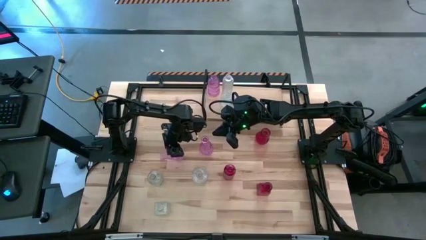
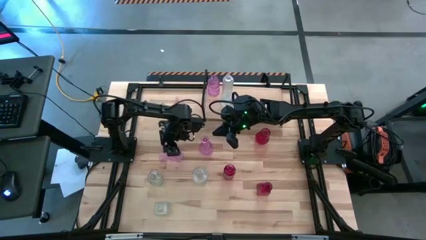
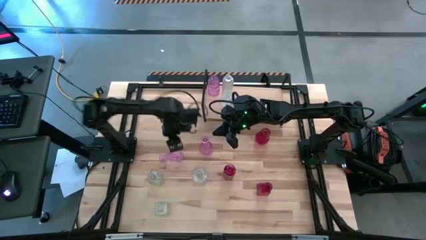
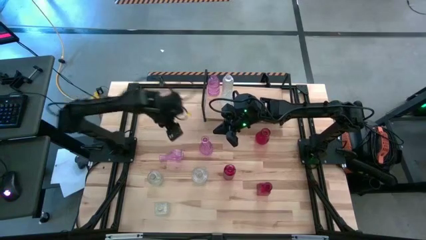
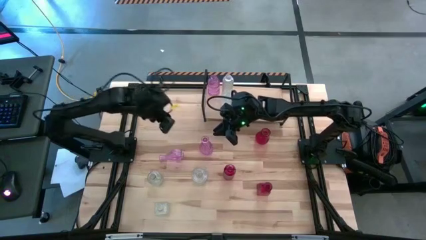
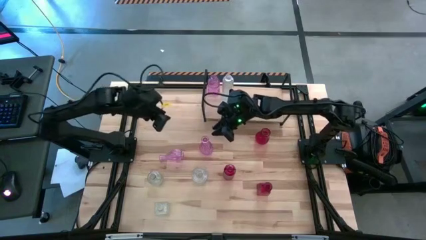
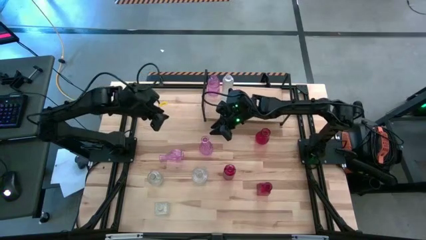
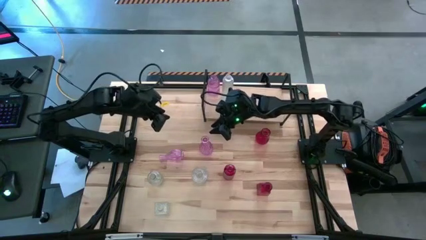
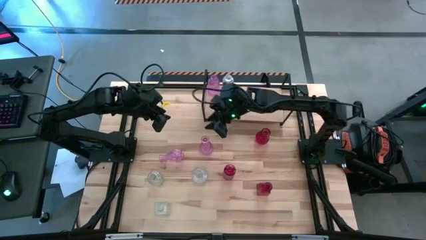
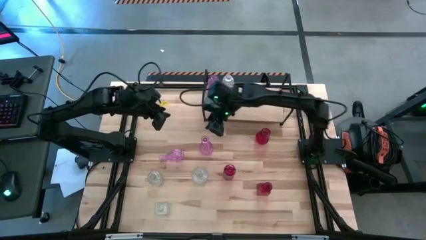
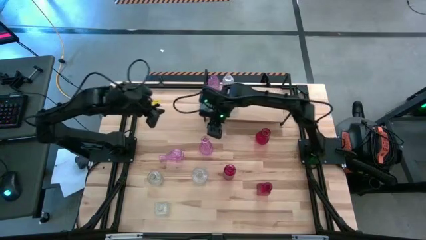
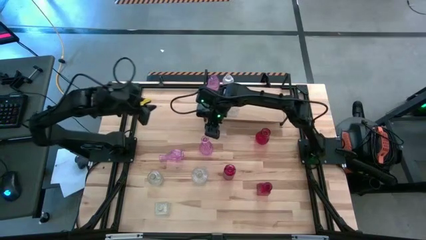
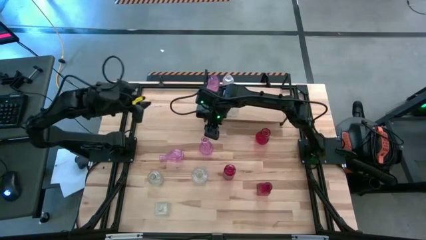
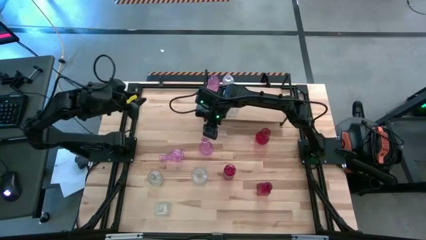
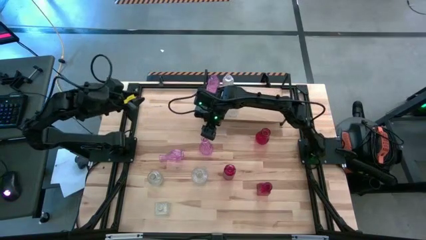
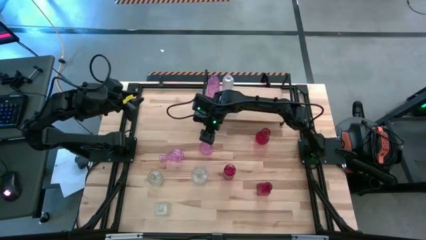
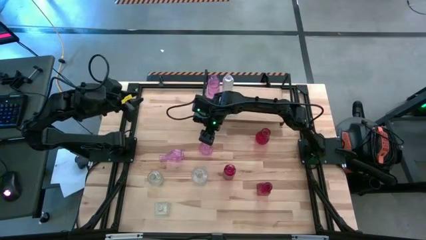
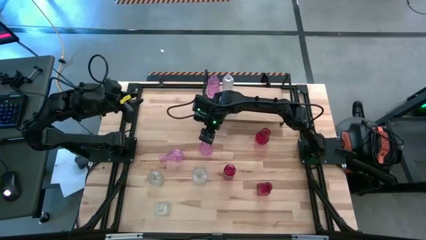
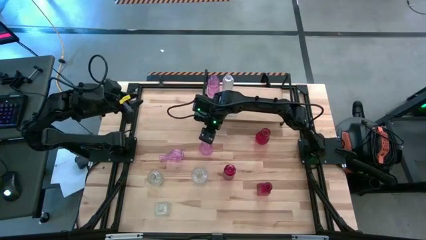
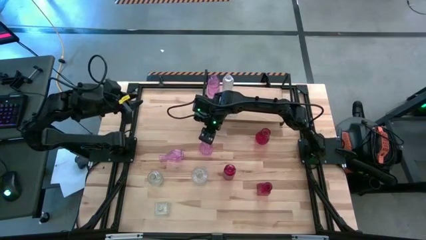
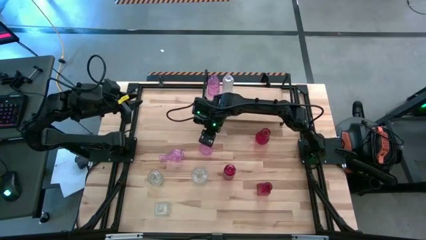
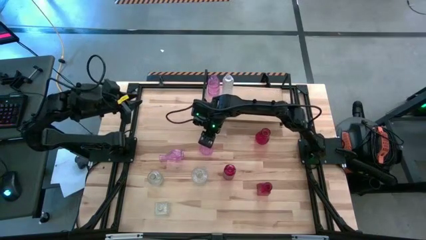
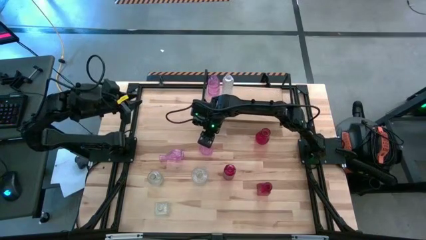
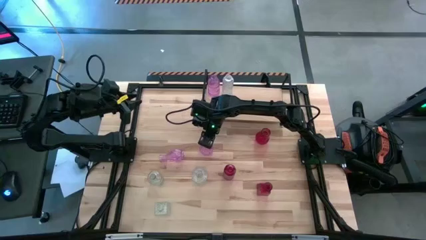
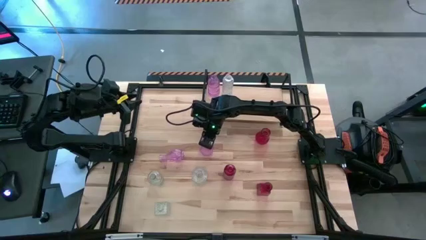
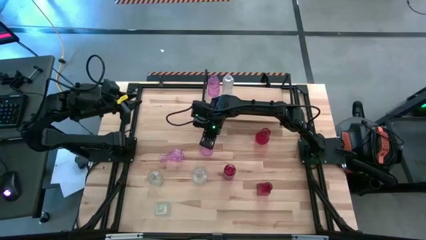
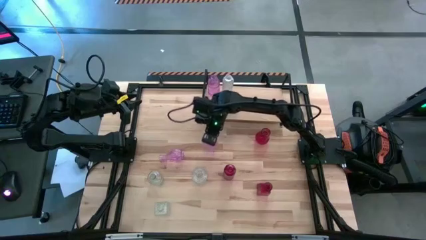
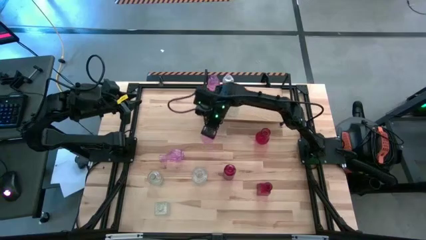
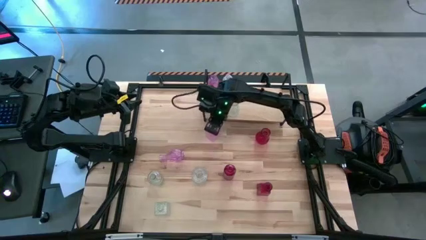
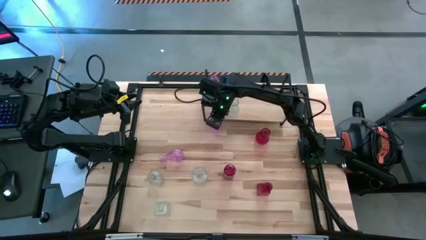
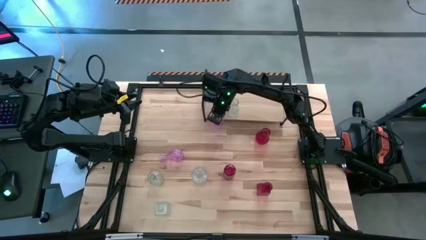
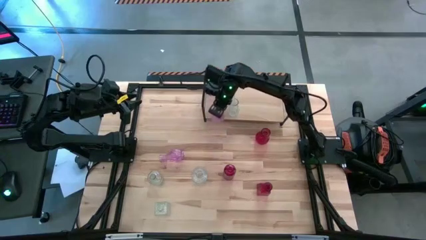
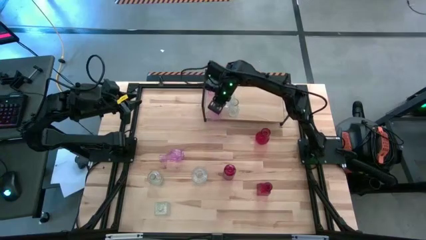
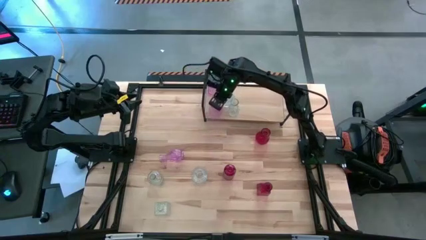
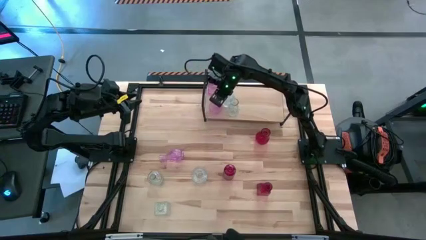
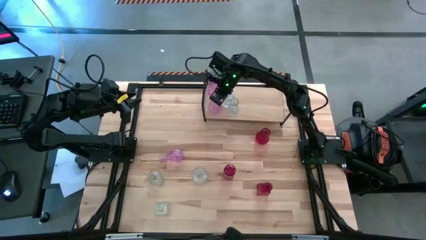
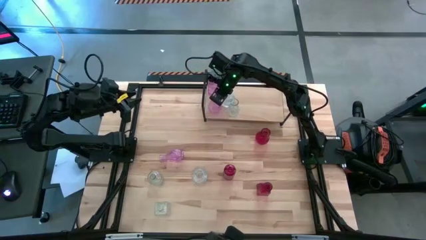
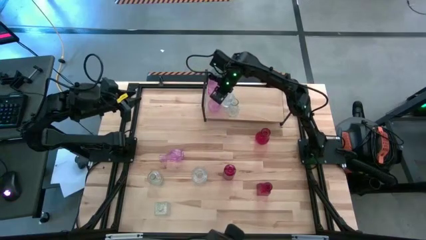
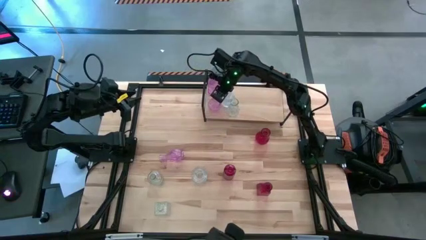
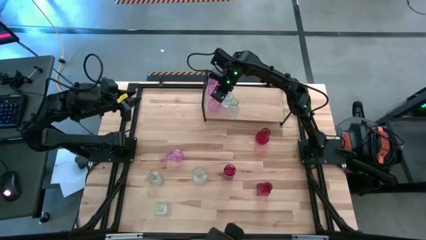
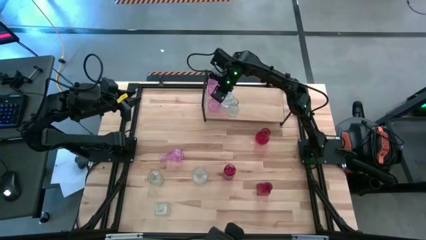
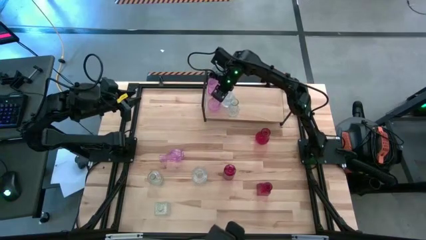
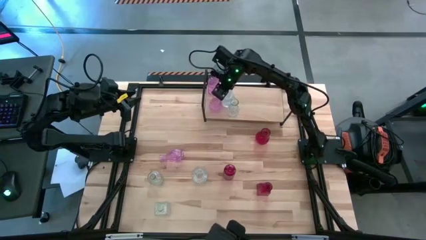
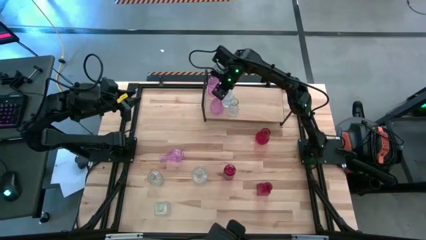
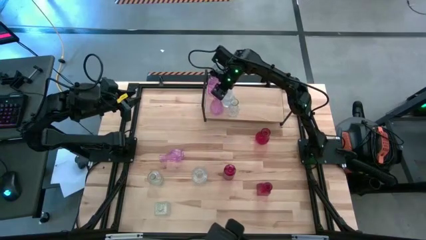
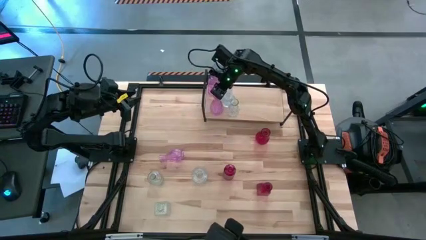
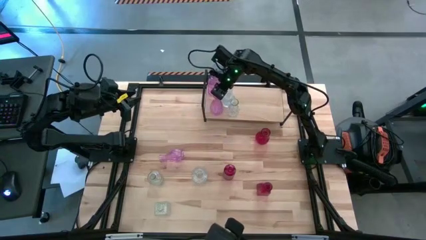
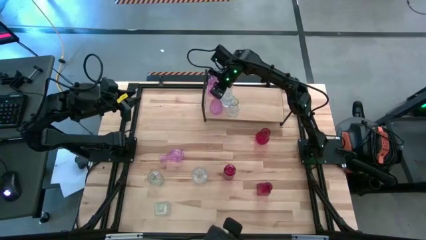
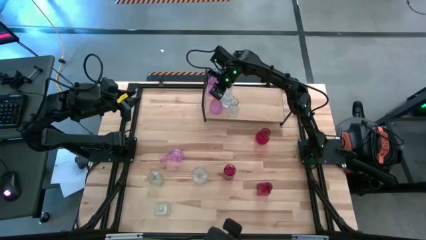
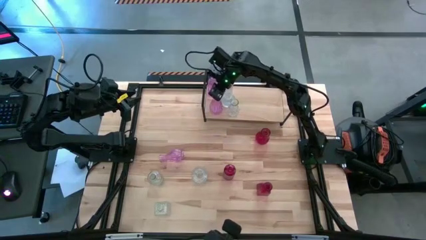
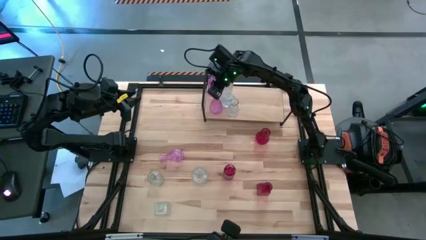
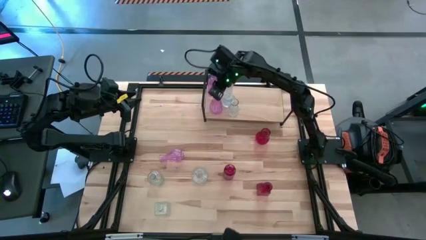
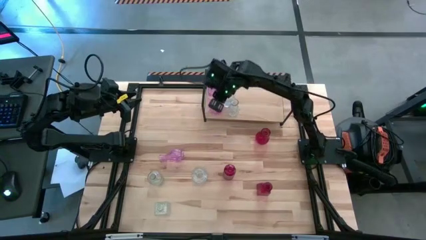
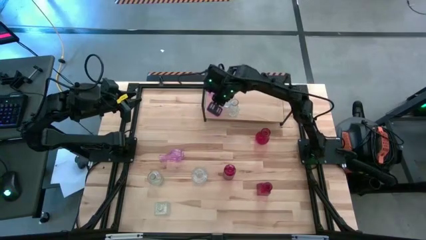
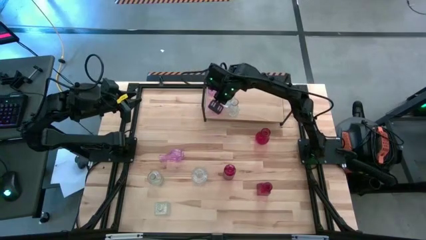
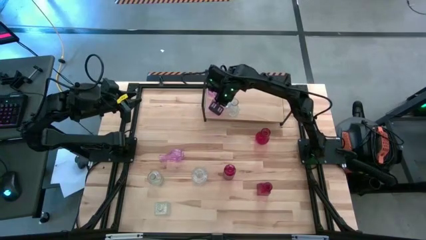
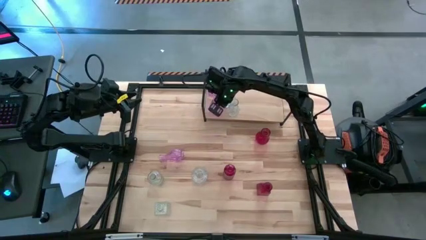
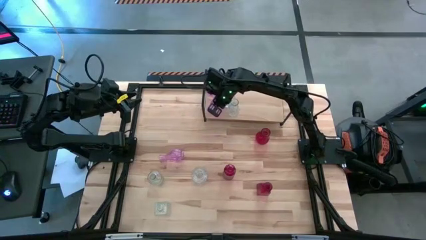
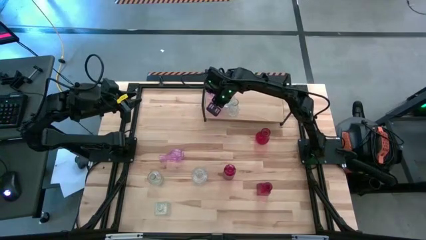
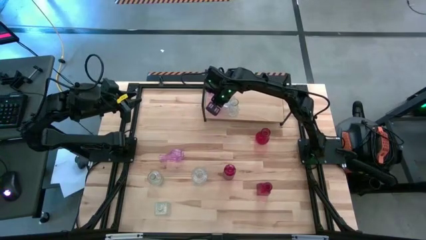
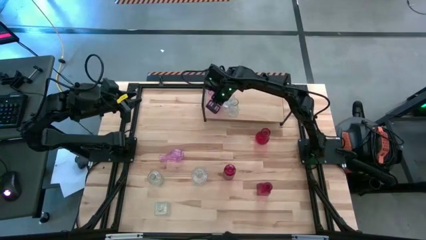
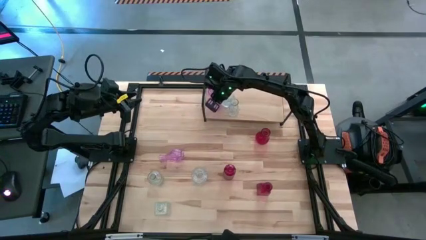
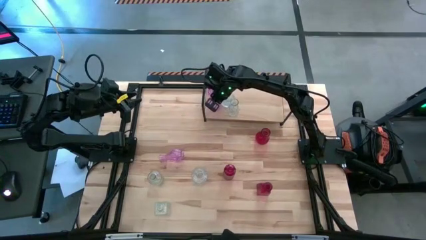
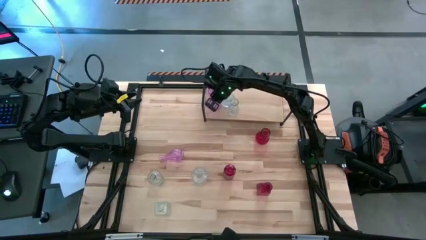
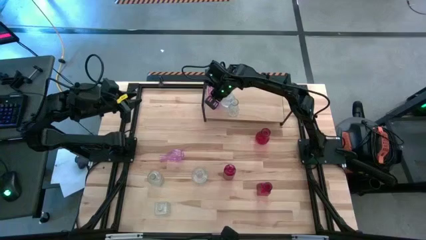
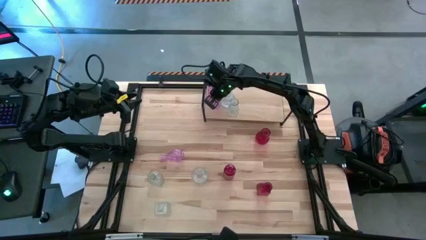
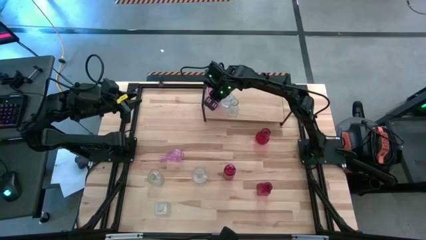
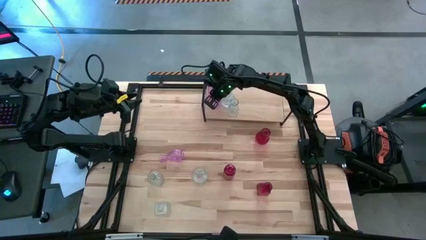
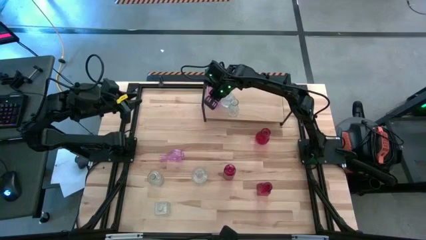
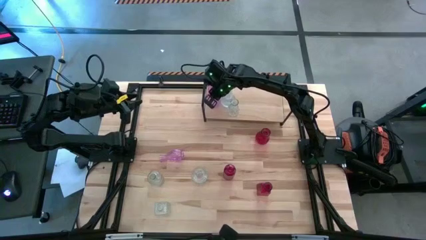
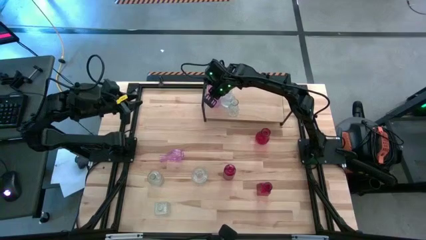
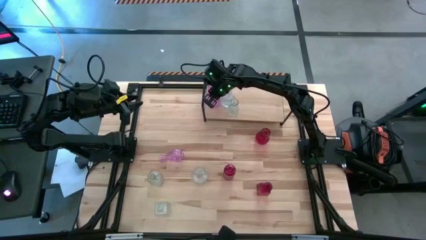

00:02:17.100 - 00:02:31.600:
Task: sort vases onto shelf
Align the violet vase with the other violet vase on the shelf
